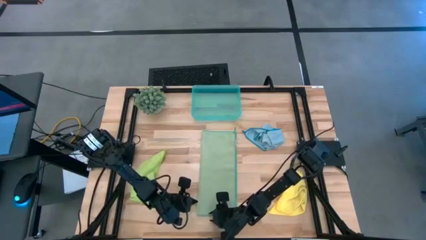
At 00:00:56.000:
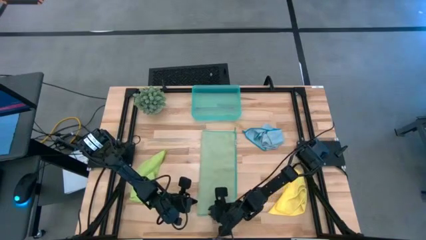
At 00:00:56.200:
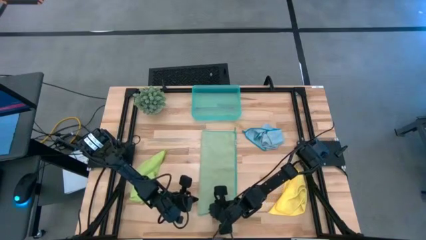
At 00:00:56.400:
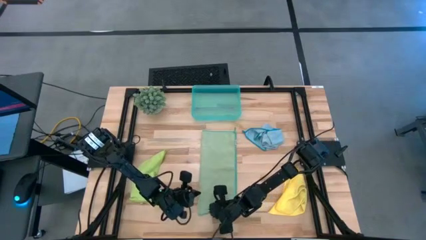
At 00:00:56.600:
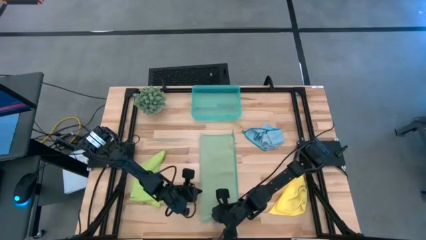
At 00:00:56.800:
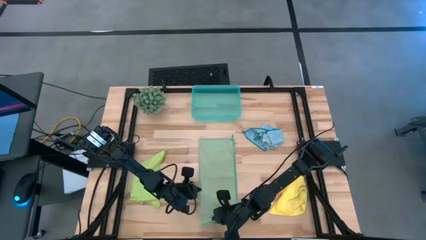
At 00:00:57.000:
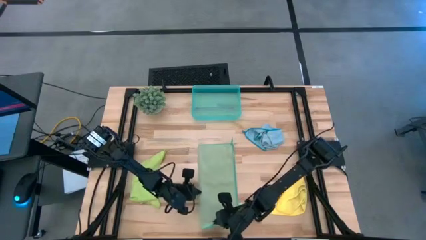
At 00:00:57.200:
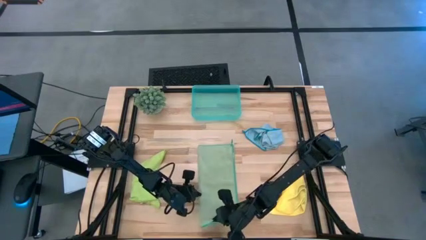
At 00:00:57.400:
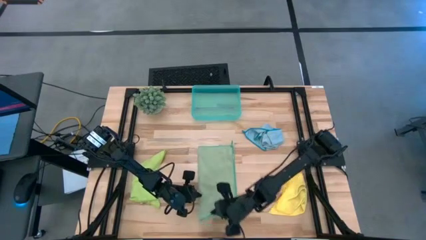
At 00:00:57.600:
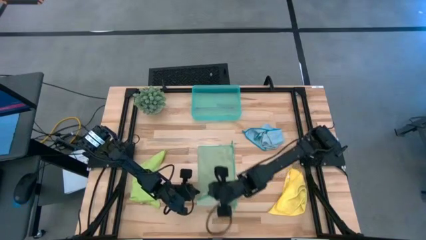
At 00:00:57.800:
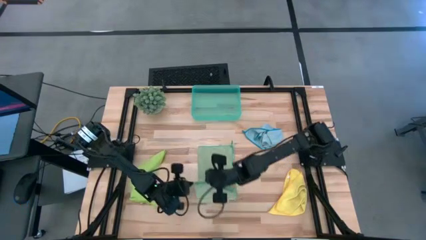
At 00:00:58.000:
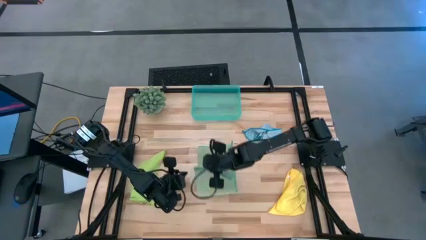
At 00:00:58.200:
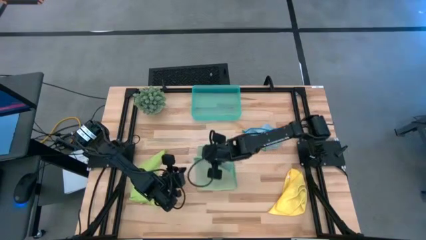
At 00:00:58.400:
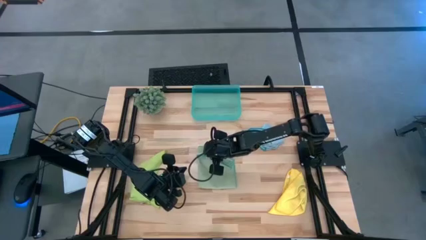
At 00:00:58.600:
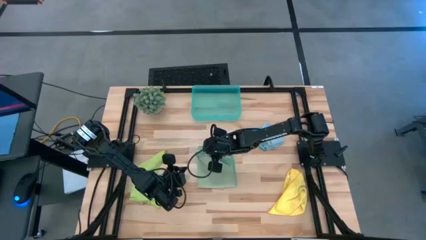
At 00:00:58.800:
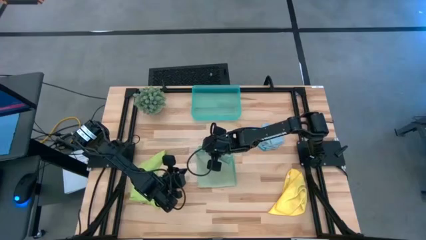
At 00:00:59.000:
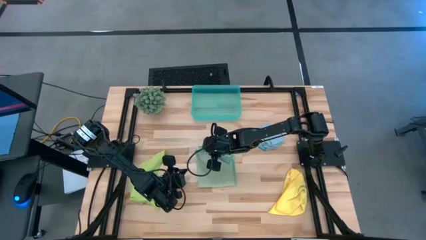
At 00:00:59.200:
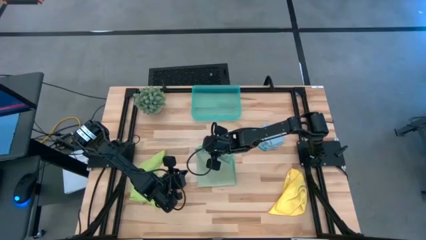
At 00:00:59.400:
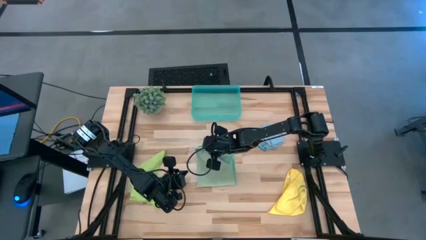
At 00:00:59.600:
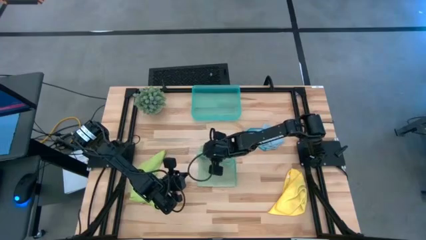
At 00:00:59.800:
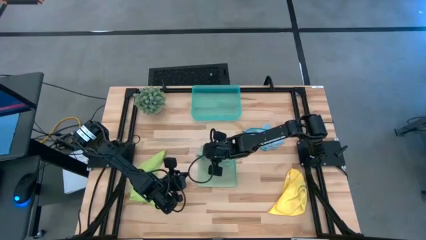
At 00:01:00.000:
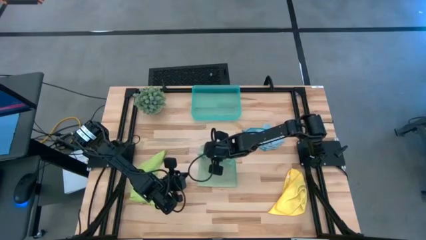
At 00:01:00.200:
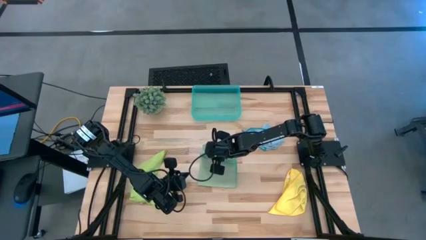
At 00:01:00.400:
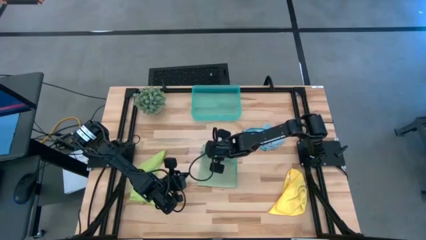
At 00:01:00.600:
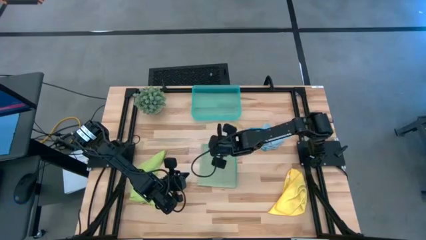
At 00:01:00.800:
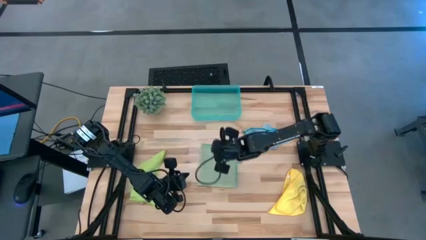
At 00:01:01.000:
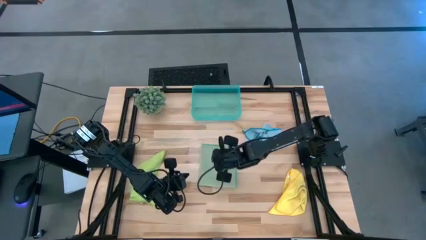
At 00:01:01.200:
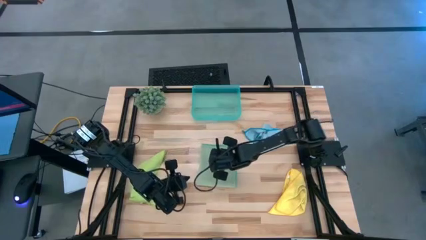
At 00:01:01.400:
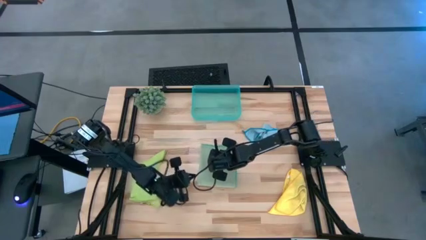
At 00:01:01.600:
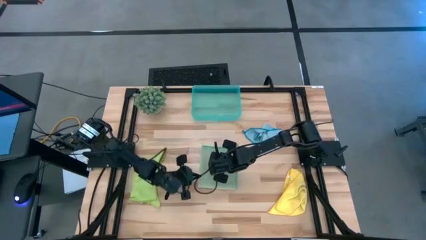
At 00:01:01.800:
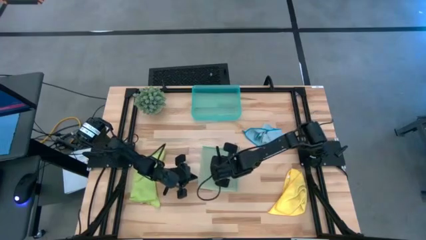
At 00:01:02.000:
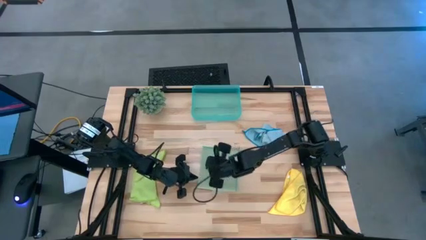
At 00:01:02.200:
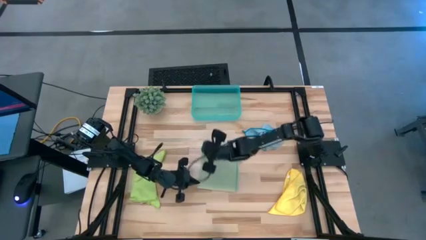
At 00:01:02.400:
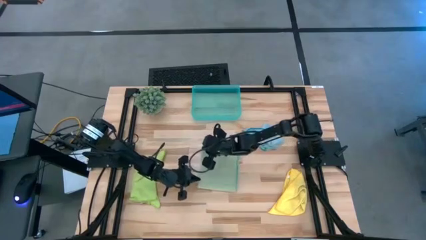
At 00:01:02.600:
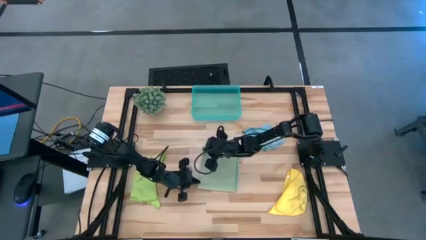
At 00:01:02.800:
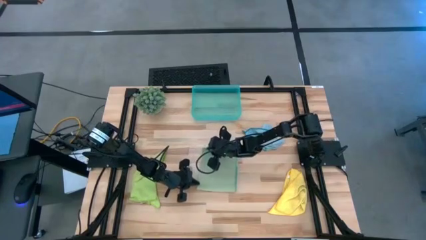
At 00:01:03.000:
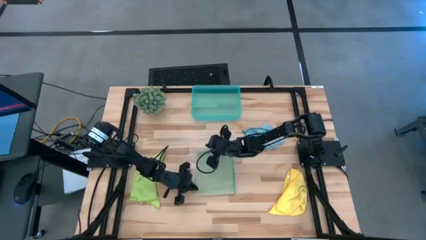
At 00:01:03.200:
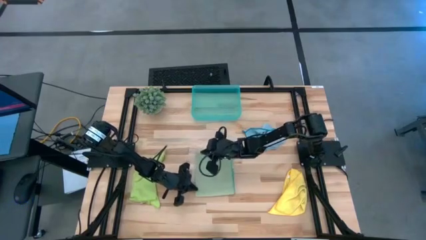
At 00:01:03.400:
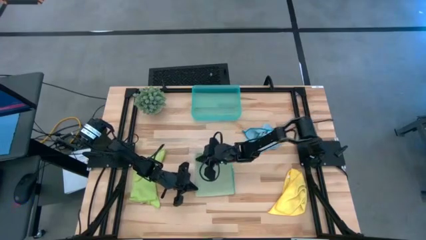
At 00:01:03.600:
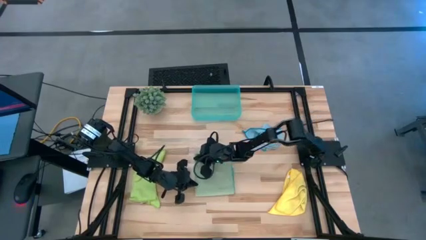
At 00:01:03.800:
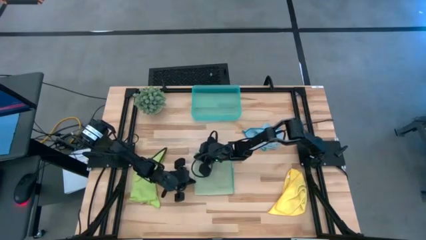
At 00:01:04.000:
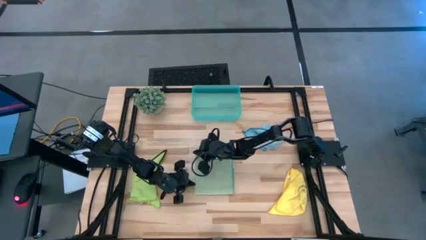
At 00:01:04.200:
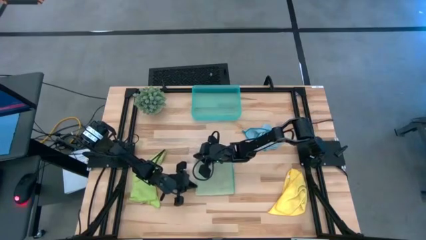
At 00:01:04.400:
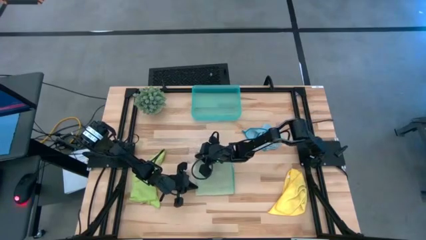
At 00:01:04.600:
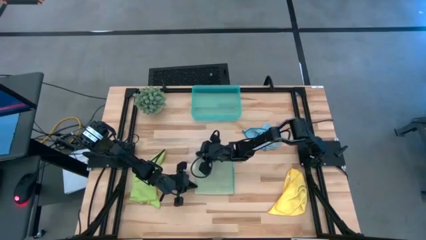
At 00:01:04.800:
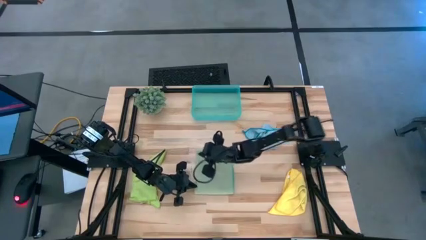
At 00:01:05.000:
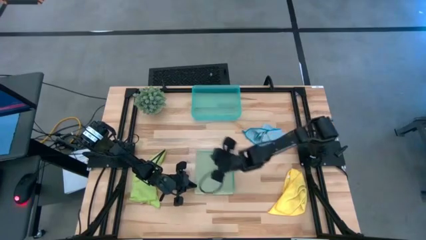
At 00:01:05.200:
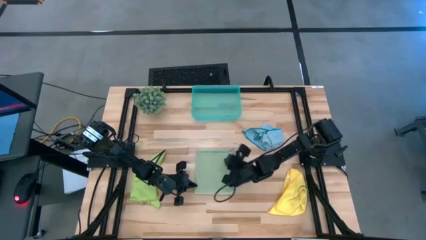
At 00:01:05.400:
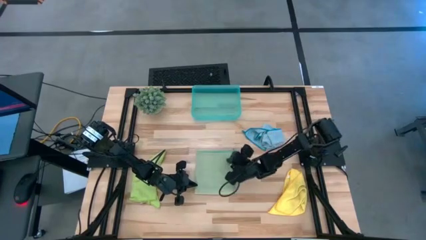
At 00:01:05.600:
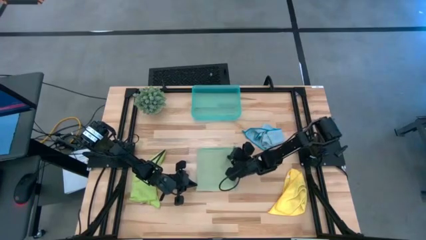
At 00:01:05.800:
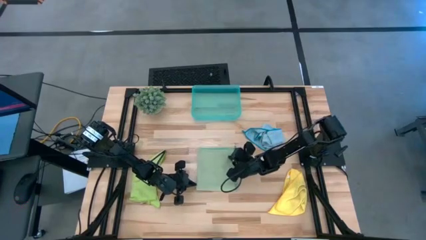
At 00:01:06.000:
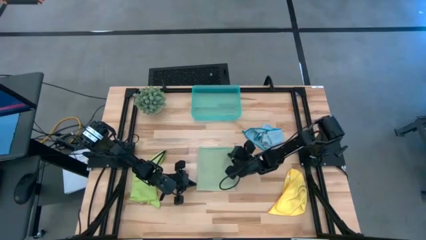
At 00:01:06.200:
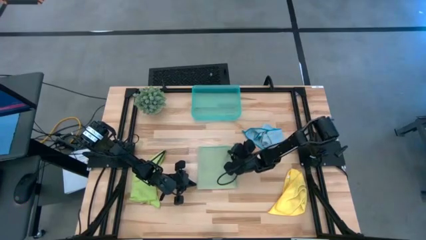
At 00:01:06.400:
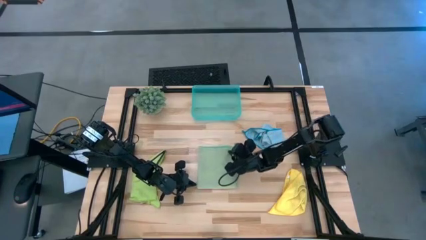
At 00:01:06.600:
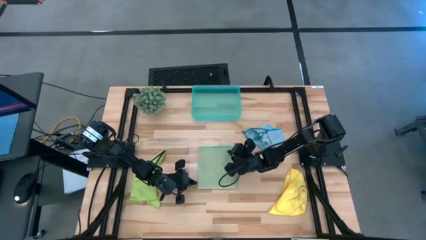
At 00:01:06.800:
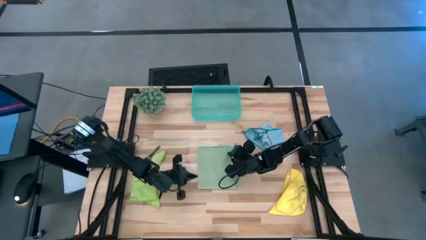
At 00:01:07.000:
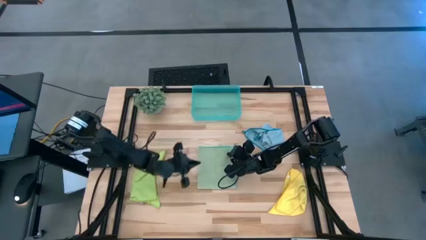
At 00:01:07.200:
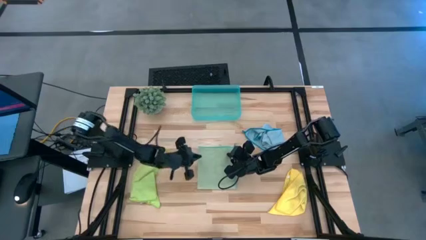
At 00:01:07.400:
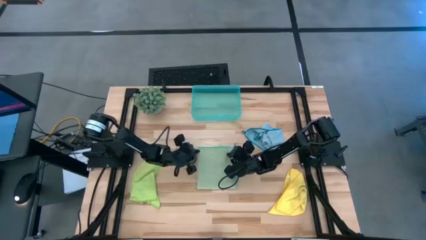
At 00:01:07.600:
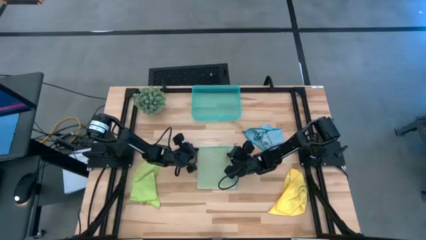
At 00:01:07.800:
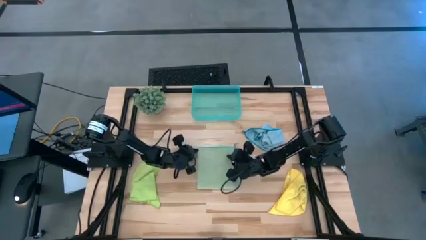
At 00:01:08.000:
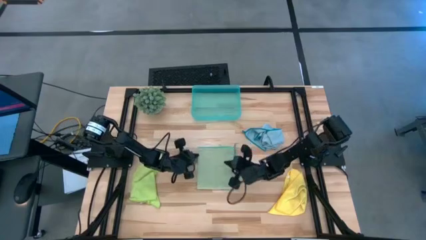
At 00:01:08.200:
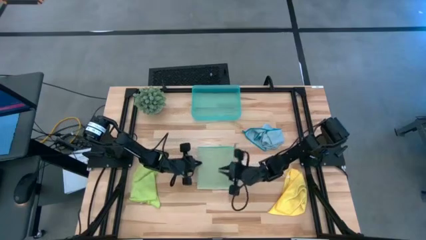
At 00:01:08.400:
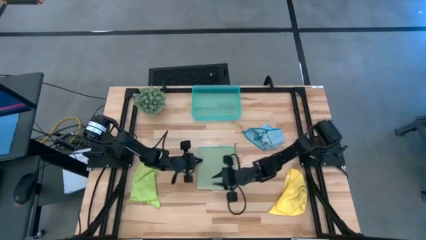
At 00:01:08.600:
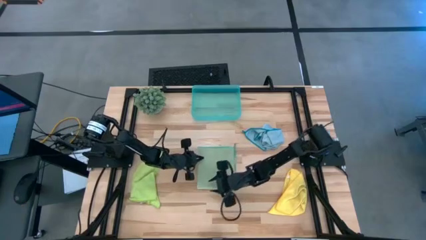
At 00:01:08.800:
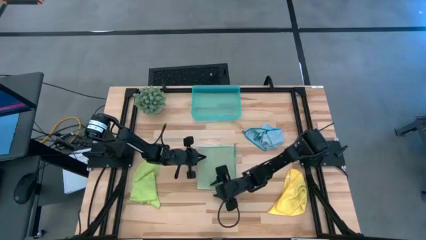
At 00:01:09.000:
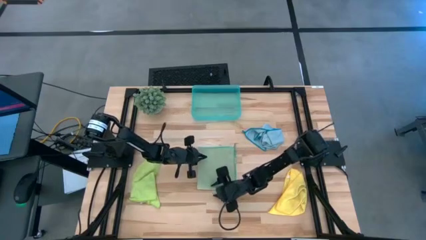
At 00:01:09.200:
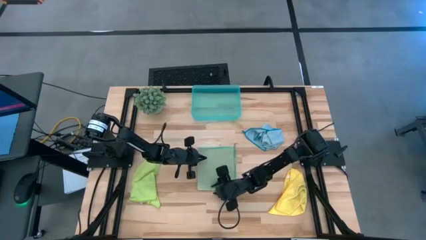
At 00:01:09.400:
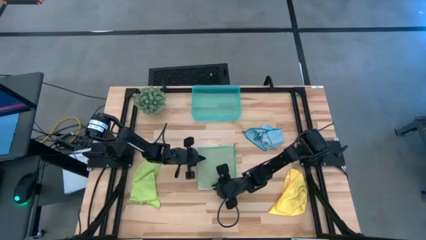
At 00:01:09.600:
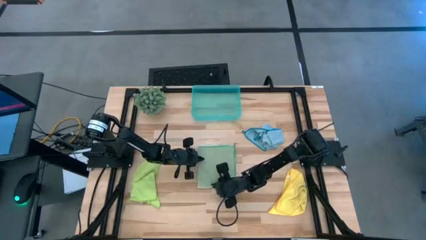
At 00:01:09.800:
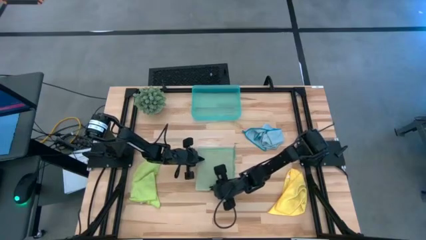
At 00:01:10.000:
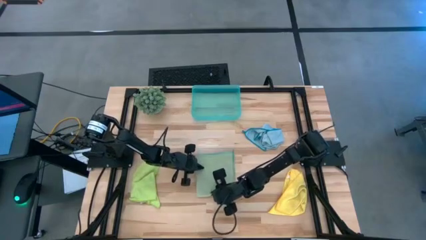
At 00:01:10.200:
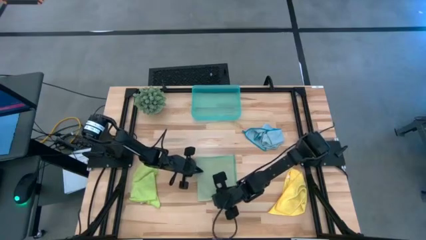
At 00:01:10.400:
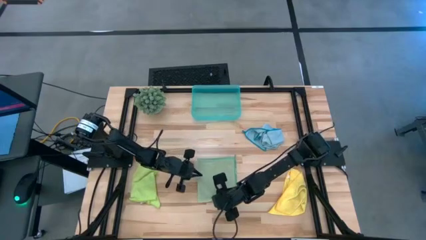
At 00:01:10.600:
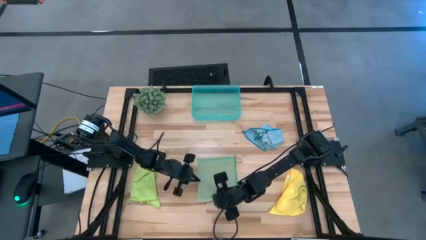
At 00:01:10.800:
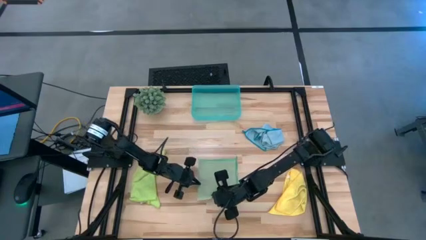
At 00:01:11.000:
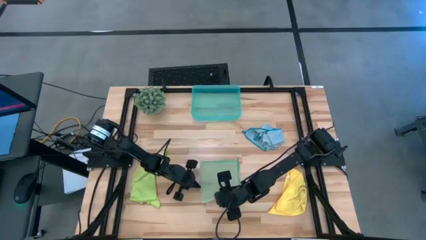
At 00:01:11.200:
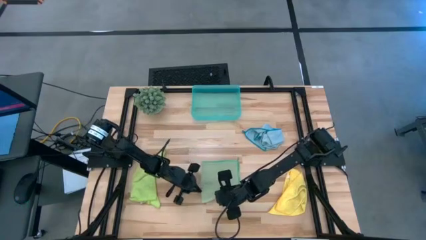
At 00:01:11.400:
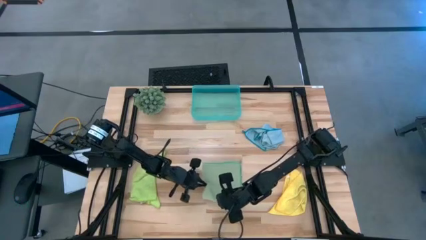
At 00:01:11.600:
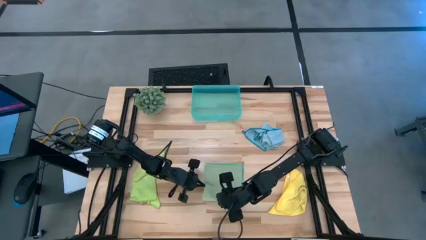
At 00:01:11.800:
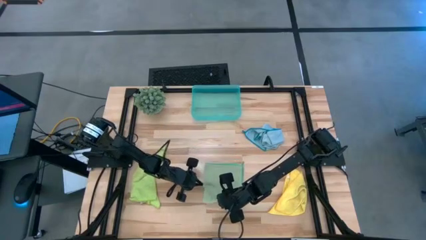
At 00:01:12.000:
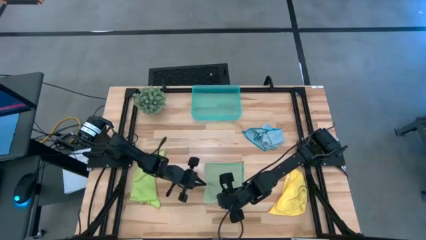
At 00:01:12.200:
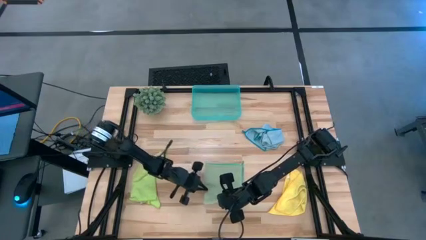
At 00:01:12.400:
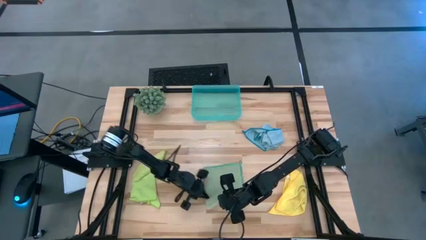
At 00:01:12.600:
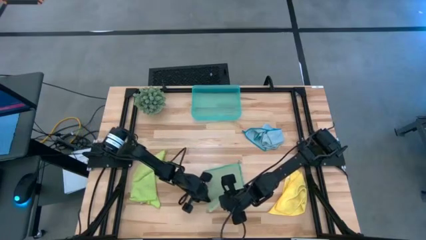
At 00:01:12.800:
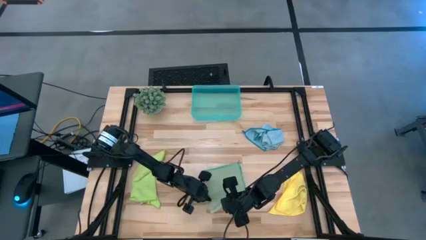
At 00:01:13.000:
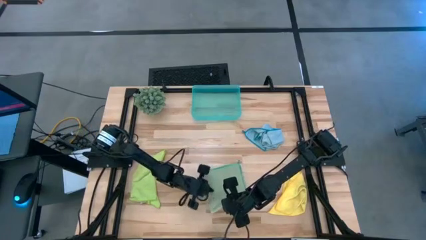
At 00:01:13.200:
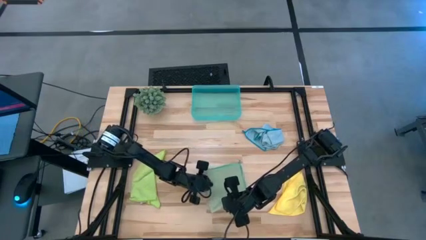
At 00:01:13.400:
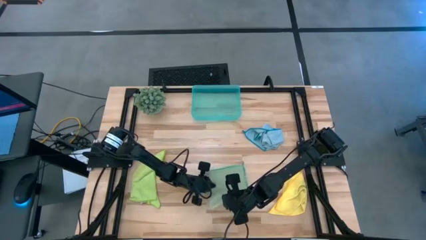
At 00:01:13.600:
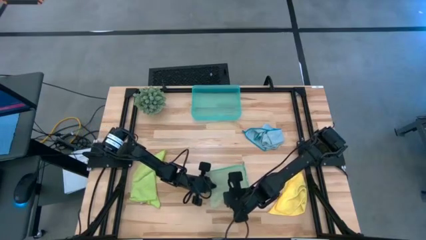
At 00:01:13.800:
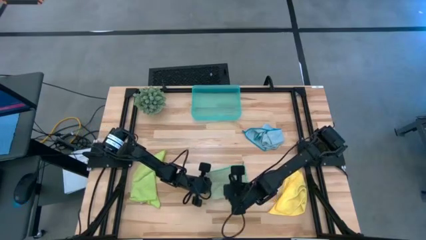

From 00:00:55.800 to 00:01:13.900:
Task: Fold microfiber towels
Fold the green towel
